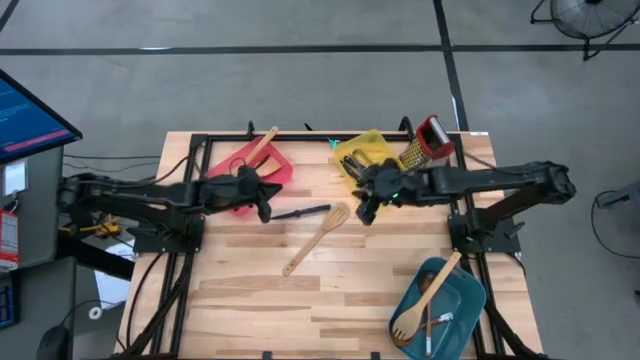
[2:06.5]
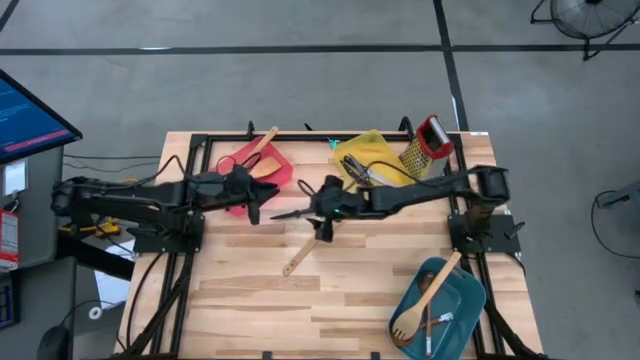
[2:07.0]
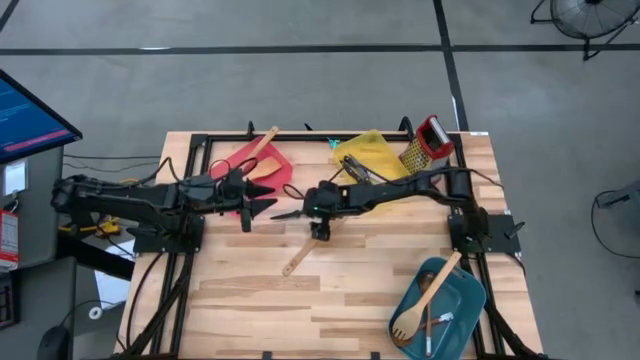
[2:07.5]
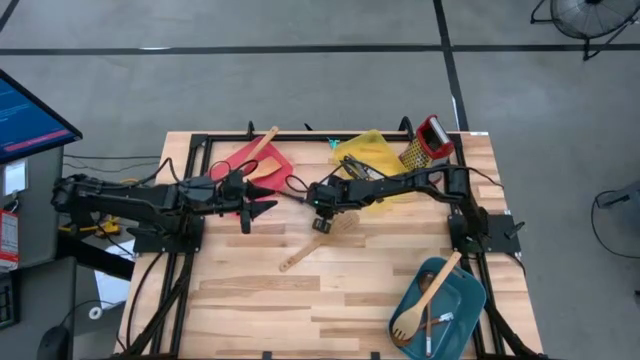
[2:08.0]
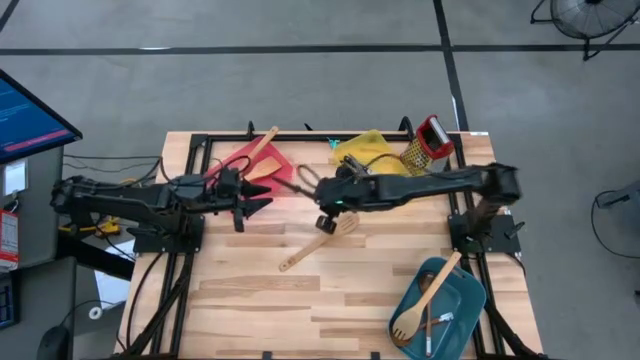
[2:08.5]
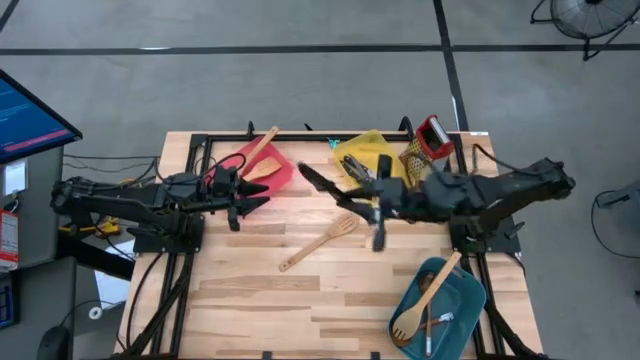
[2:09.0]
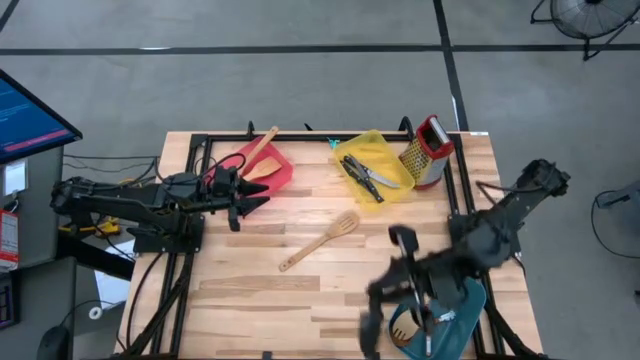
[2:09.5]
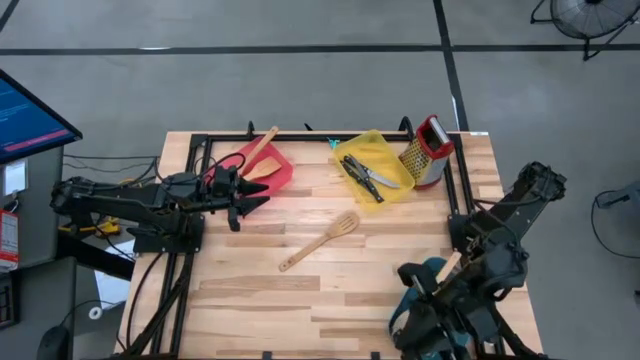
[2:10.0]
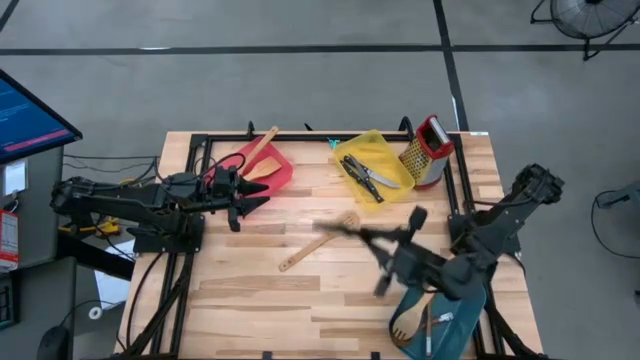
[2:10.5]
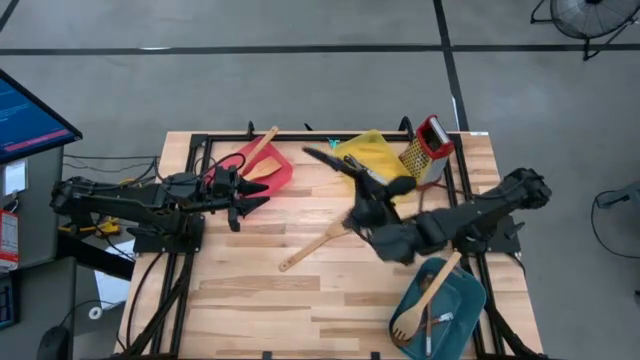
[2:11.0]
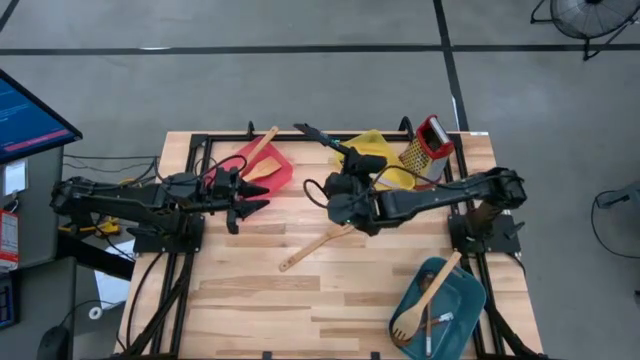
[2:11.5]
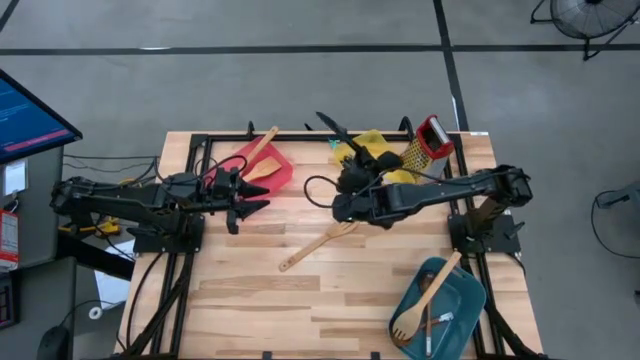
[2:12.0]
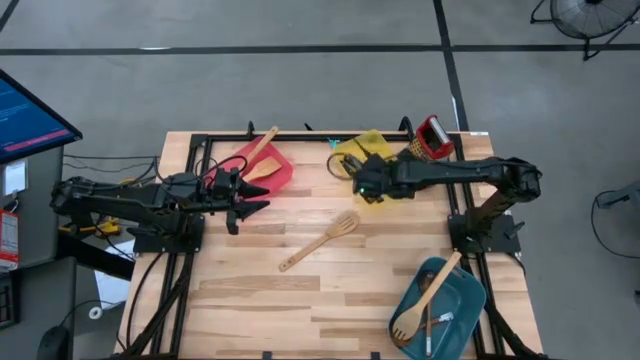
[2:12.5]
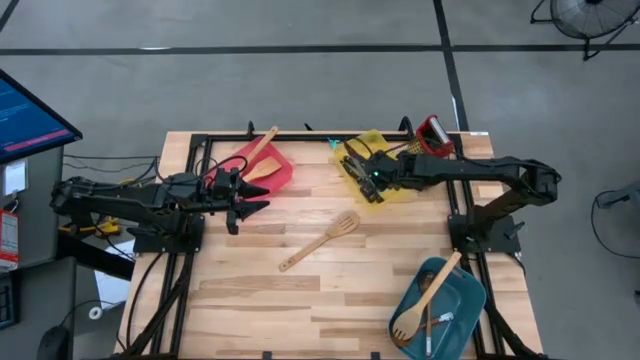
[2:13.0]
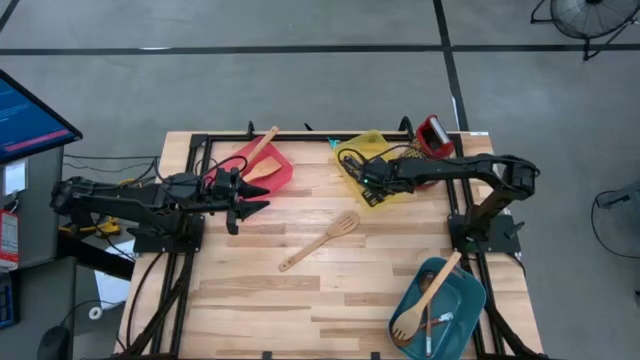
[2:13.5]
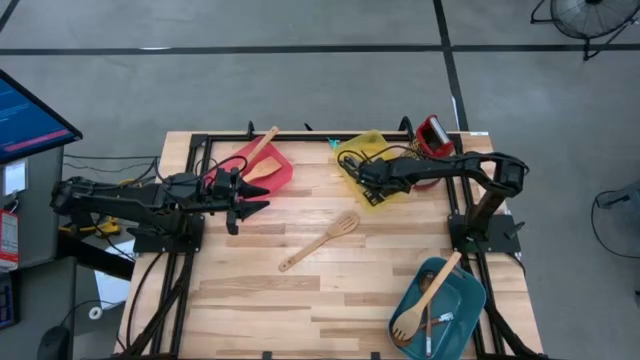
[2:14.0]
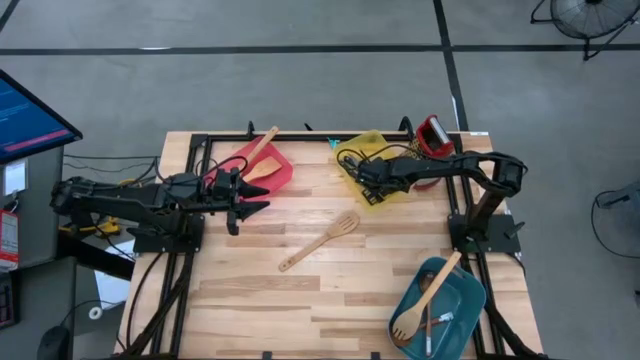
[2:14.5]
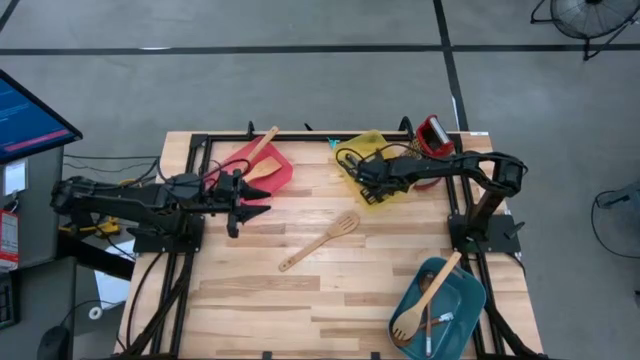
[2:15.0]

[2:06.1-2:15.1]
Task: Pick & Place Kitchen Items
Put the black knife into the yellow bin

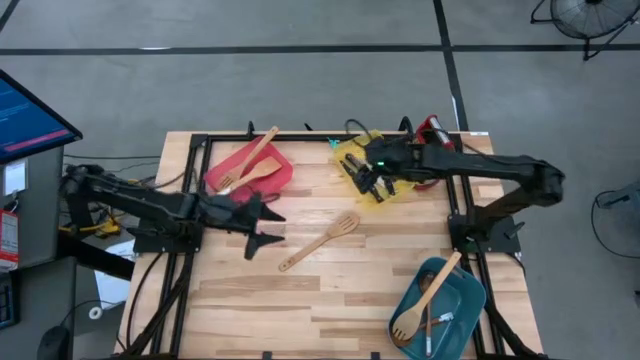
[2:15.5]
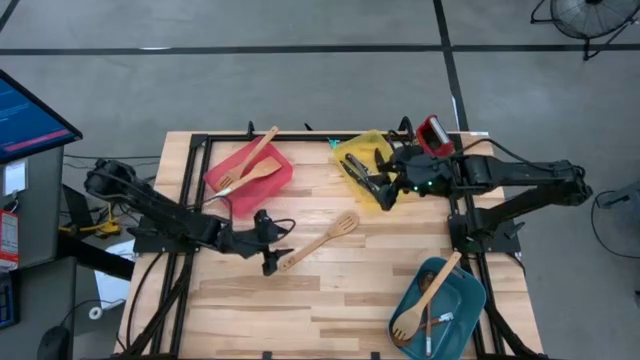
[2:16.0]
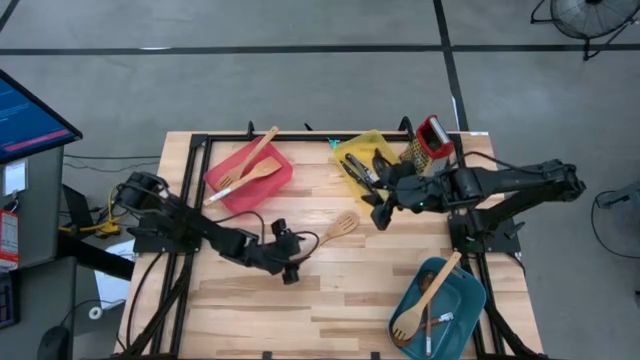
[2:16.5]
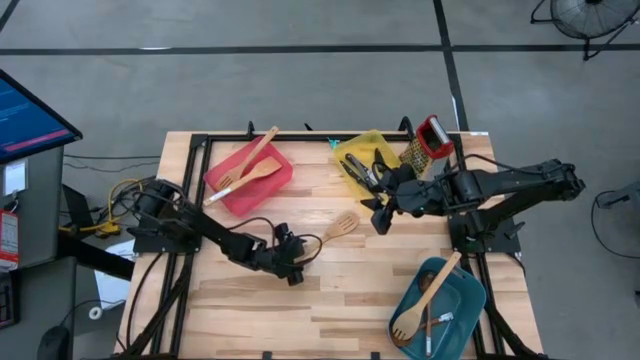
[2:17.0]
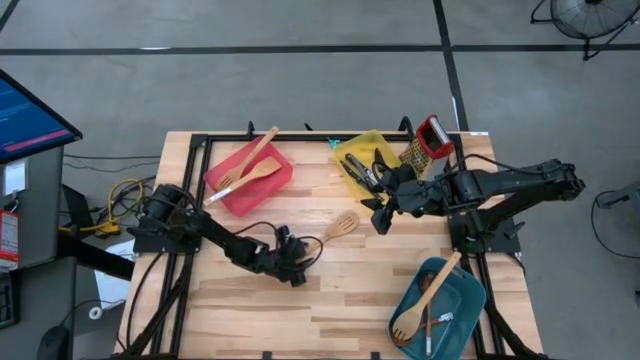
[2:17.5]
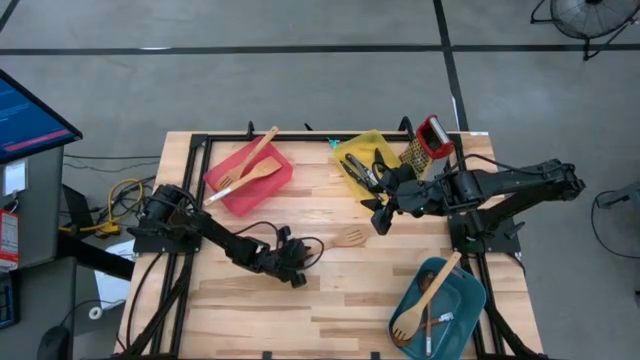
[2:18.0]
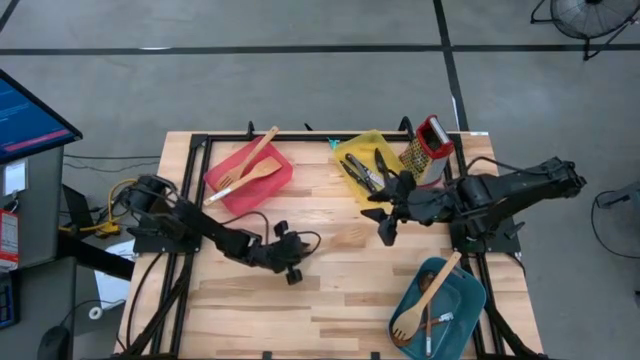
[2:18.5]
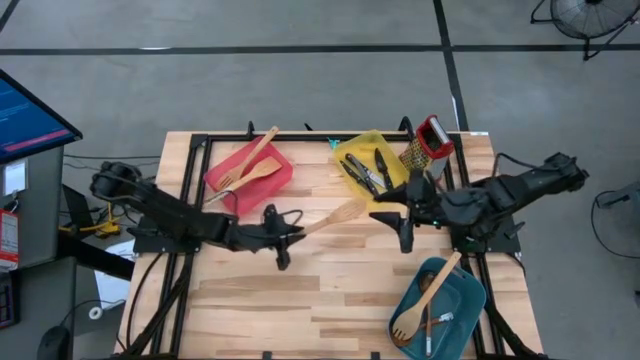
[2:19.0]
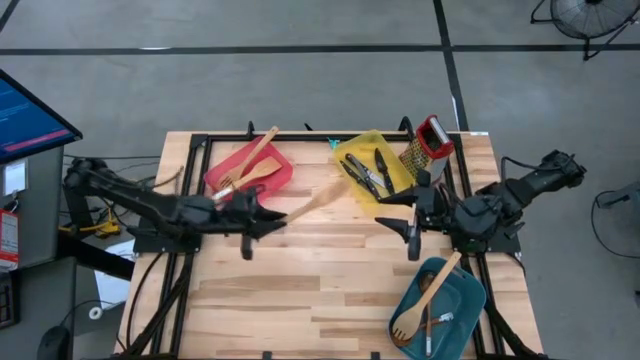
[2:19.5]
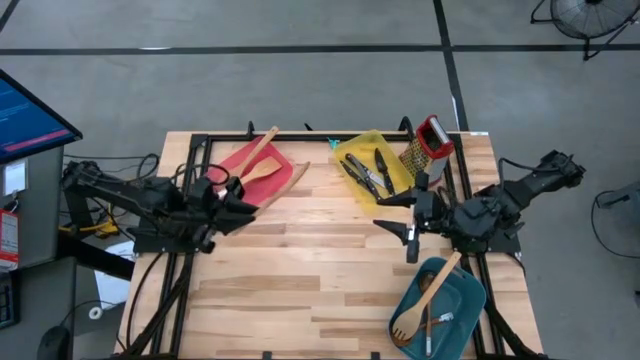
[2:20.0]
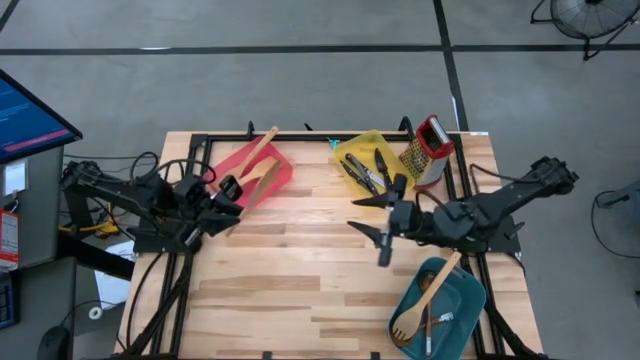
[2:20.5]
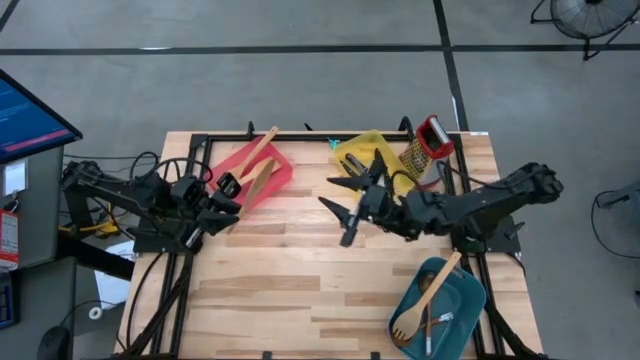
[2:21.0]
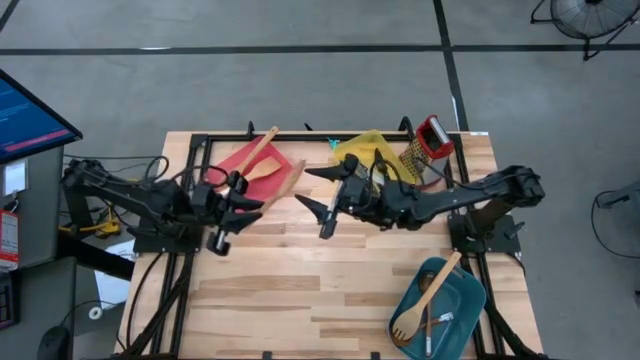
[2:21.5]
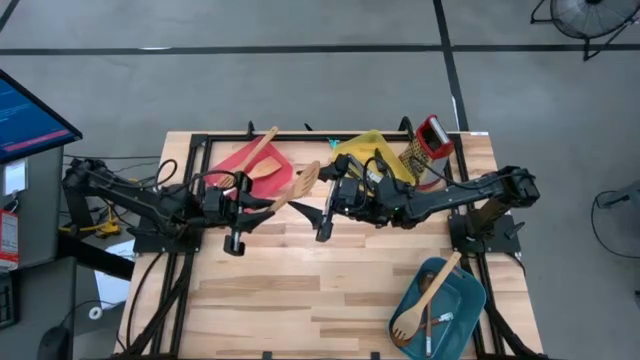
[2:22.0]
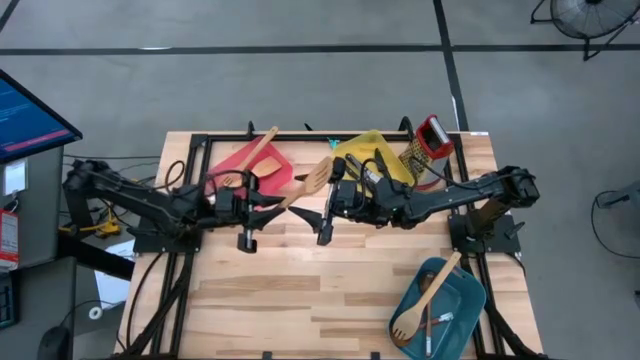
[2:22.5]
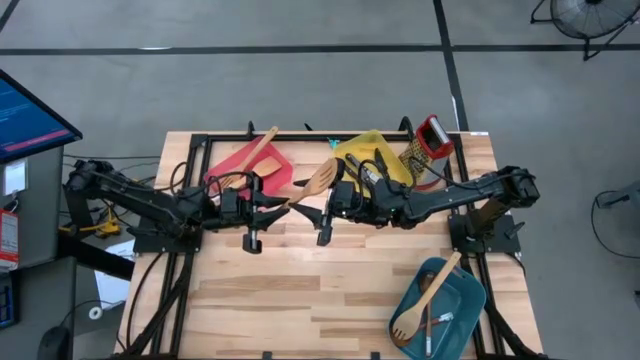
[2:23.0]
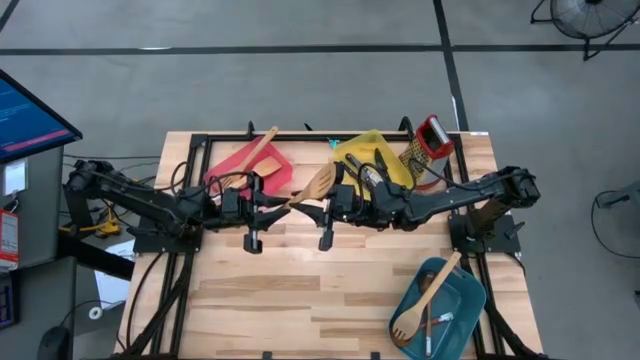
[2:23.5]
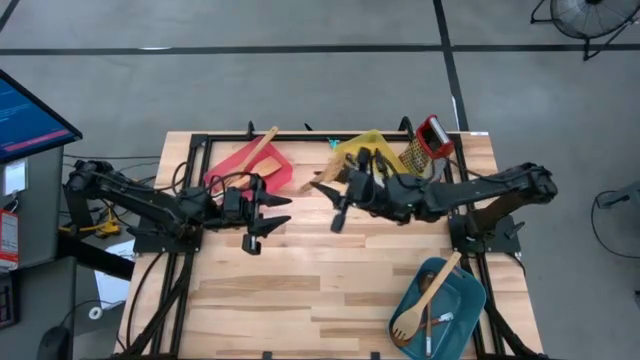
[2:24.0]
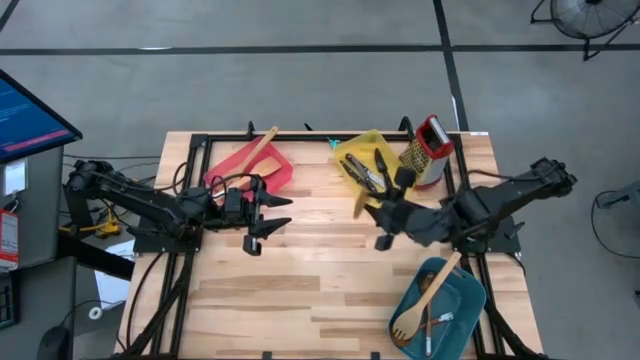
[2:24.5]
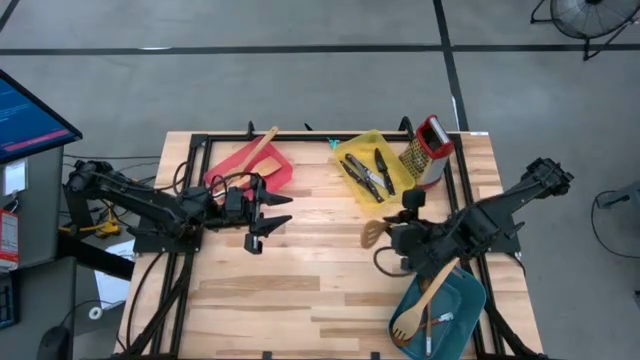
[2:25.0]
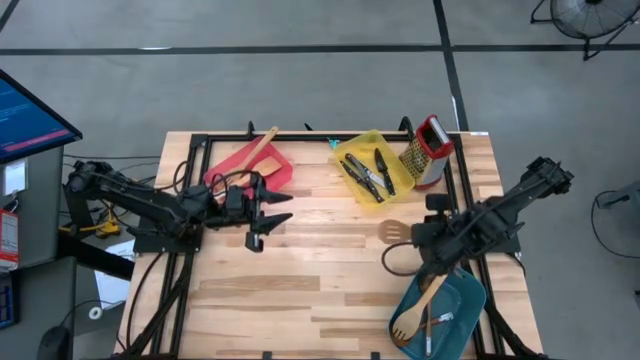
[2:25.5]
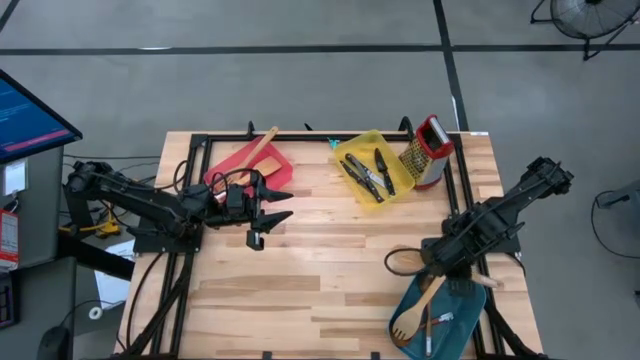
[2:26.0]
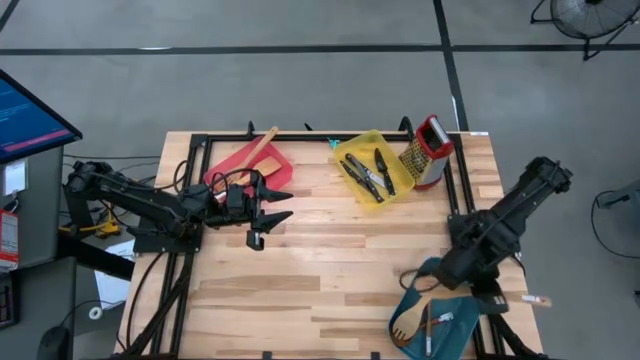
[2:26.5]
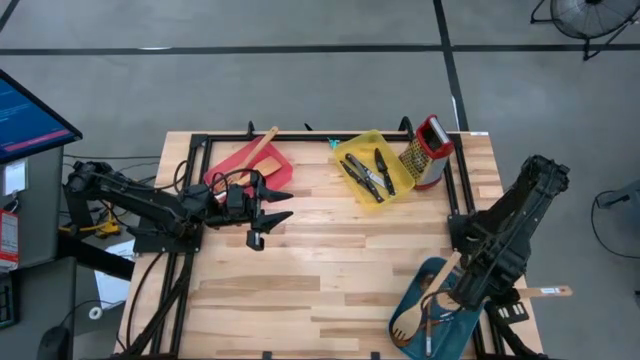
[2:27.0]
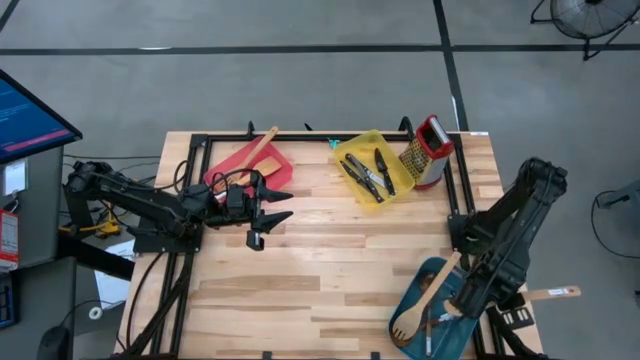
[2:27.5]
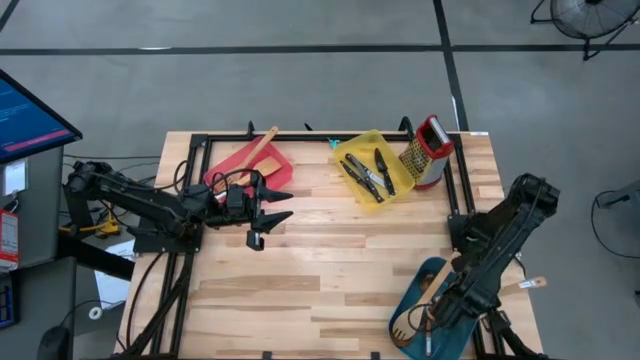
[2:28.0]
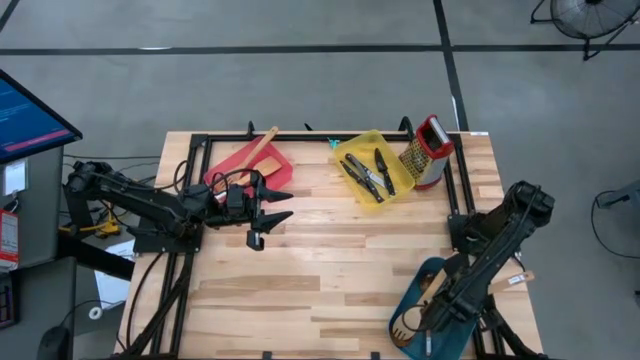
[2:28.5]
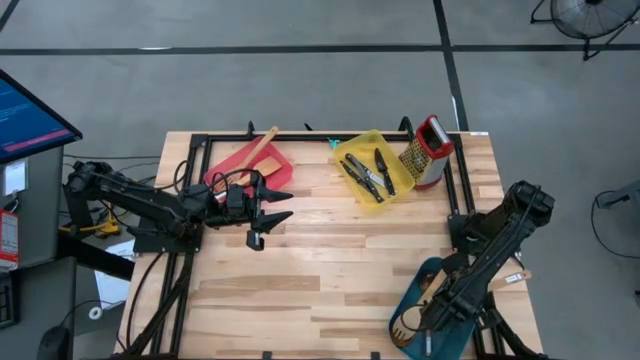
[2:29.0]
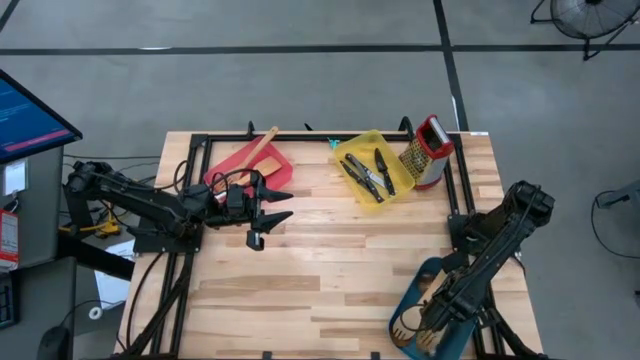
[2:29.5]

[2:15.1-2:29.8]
Put the wooden slotted serving spoon into the blue bin
